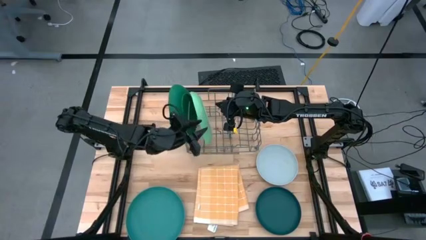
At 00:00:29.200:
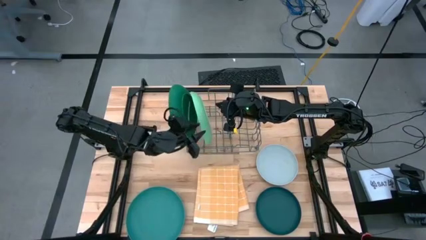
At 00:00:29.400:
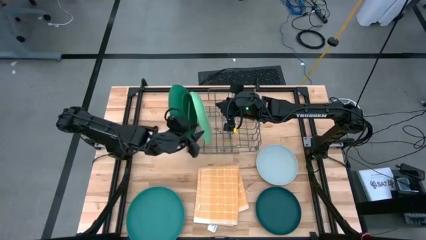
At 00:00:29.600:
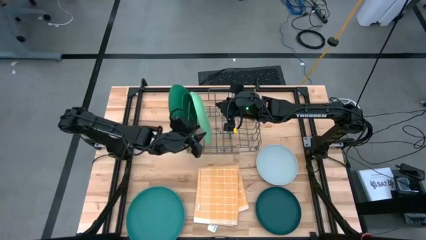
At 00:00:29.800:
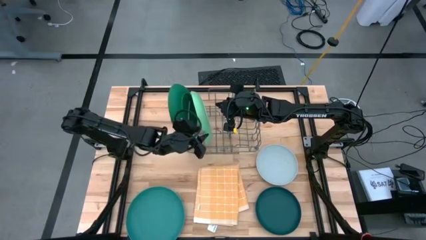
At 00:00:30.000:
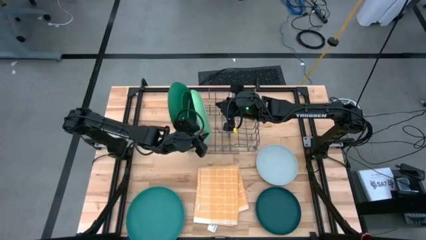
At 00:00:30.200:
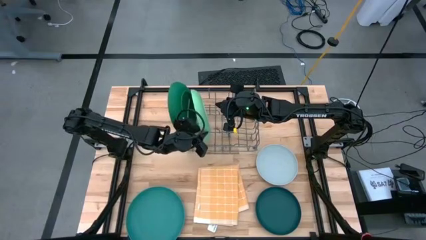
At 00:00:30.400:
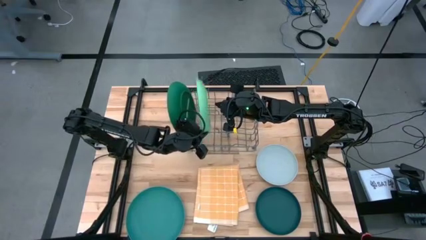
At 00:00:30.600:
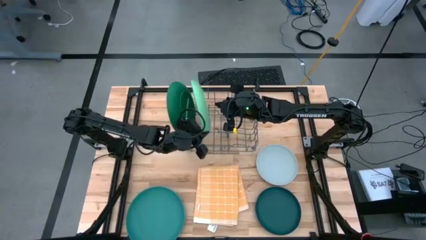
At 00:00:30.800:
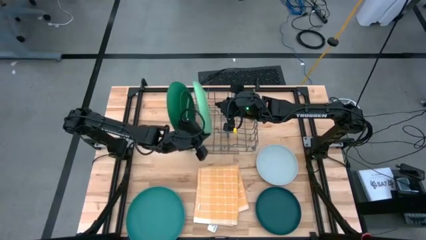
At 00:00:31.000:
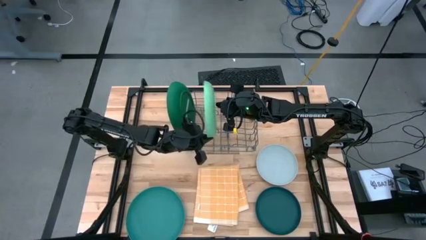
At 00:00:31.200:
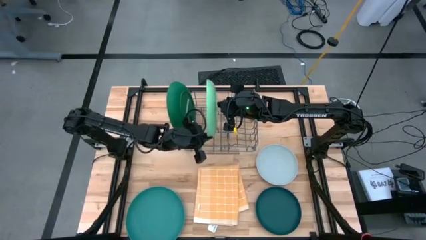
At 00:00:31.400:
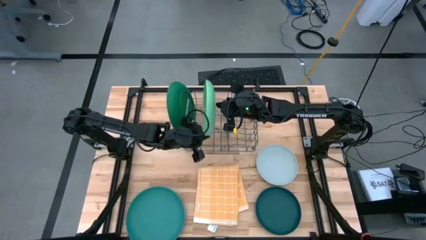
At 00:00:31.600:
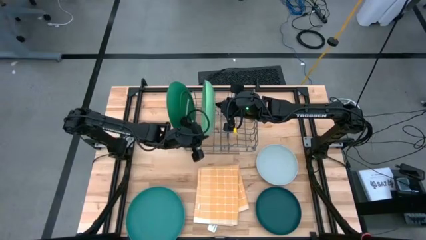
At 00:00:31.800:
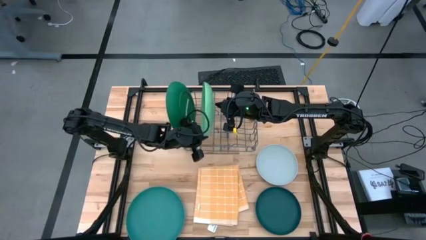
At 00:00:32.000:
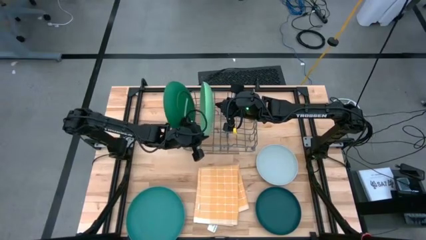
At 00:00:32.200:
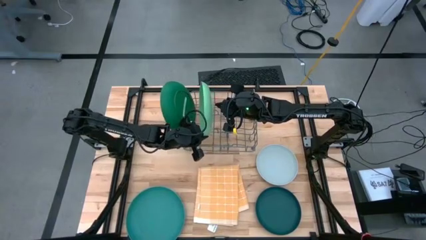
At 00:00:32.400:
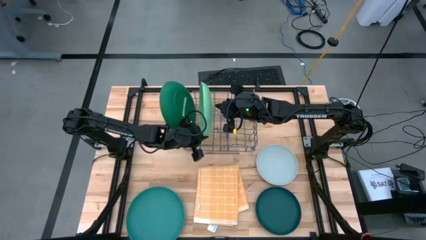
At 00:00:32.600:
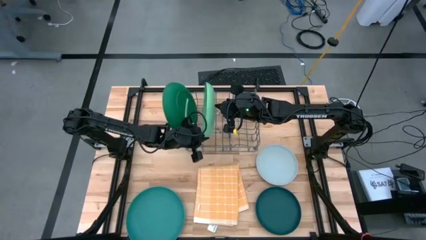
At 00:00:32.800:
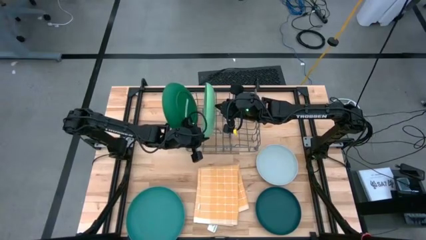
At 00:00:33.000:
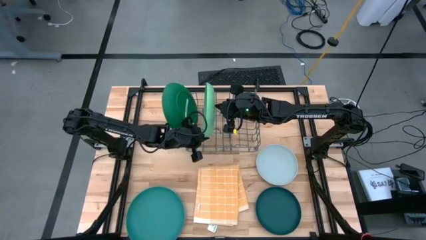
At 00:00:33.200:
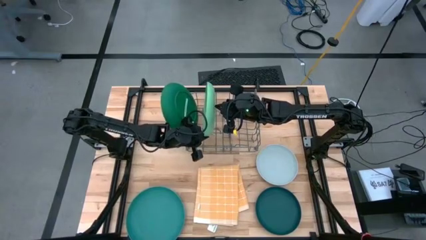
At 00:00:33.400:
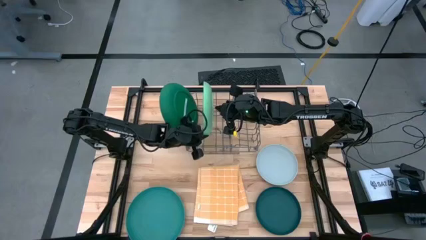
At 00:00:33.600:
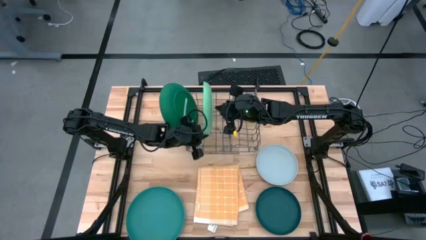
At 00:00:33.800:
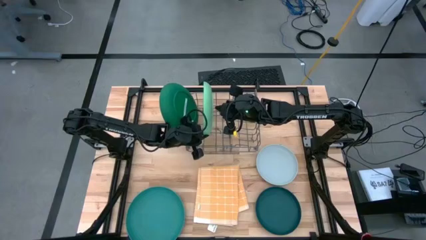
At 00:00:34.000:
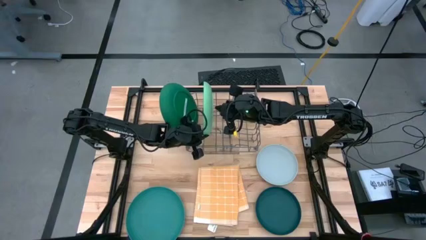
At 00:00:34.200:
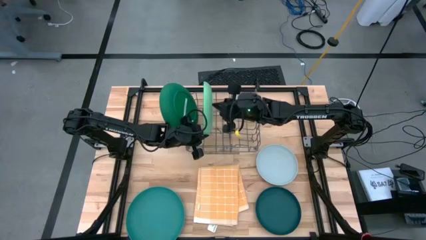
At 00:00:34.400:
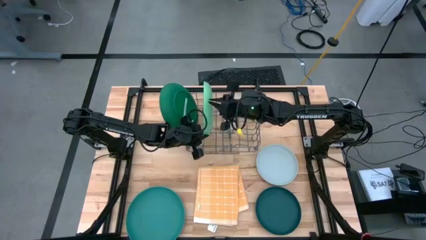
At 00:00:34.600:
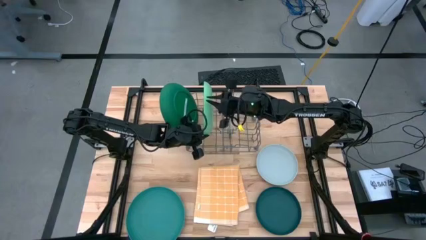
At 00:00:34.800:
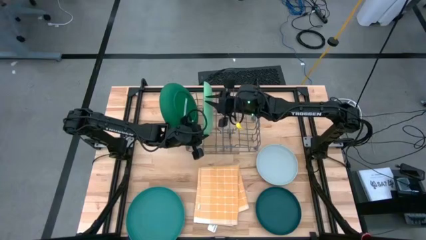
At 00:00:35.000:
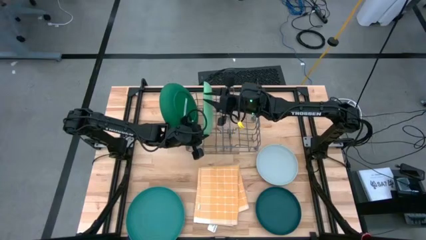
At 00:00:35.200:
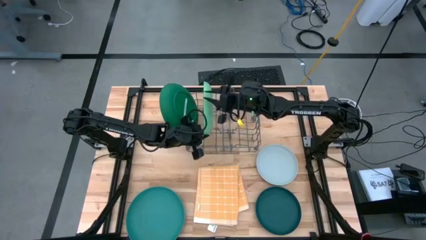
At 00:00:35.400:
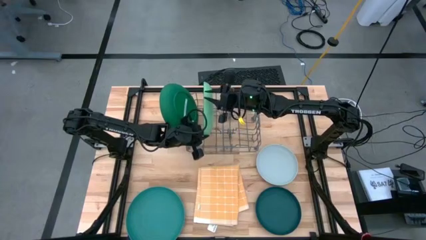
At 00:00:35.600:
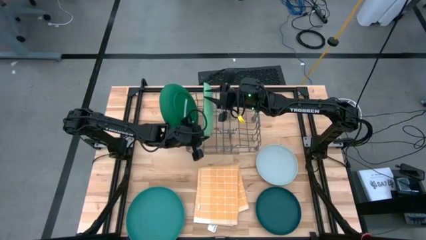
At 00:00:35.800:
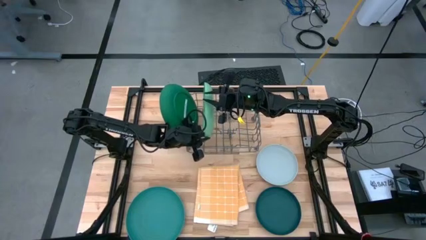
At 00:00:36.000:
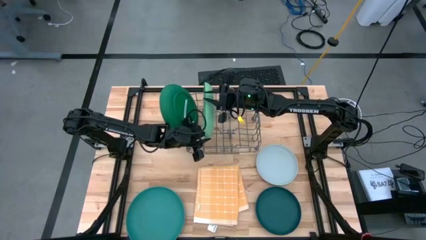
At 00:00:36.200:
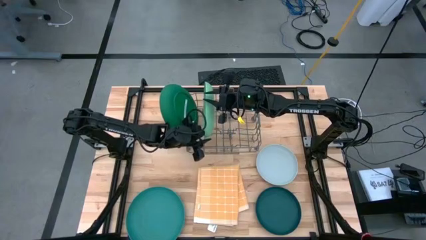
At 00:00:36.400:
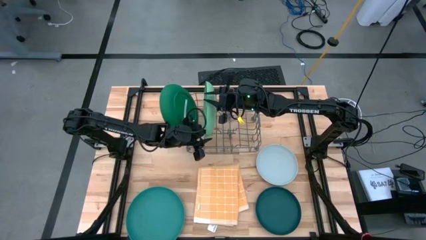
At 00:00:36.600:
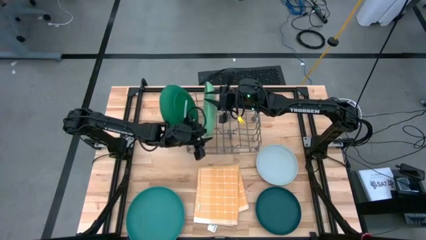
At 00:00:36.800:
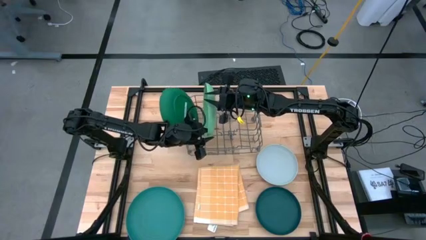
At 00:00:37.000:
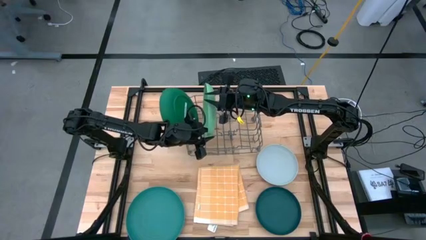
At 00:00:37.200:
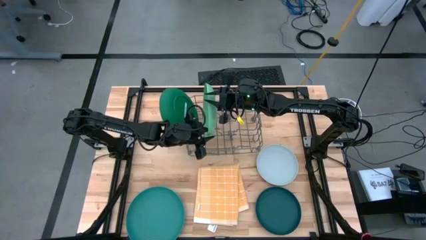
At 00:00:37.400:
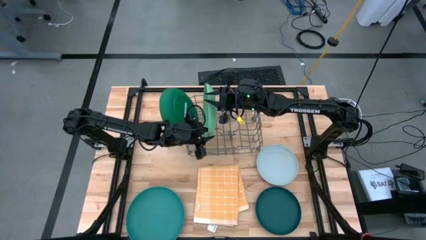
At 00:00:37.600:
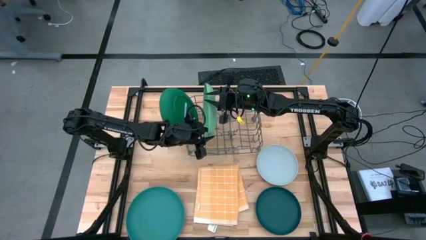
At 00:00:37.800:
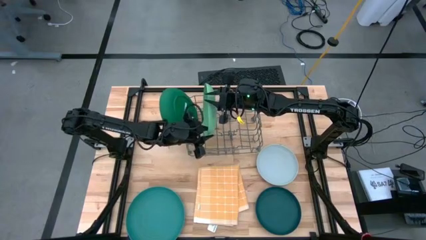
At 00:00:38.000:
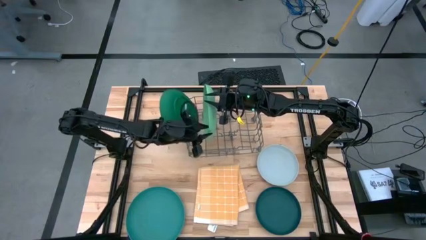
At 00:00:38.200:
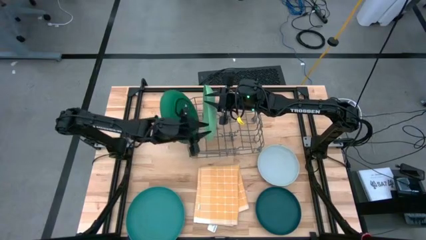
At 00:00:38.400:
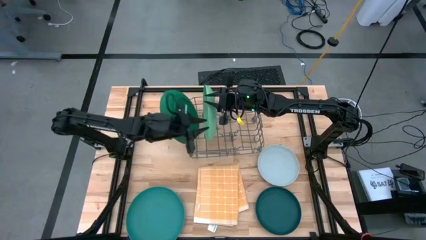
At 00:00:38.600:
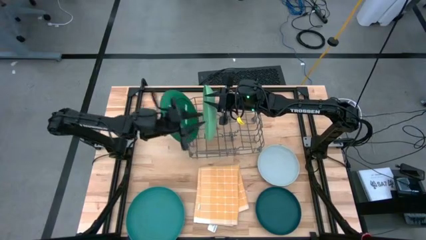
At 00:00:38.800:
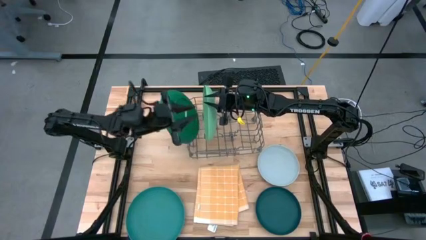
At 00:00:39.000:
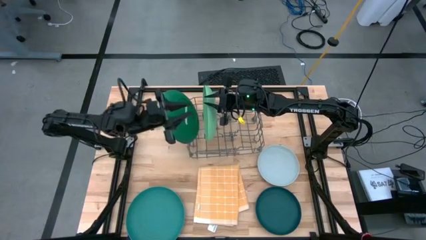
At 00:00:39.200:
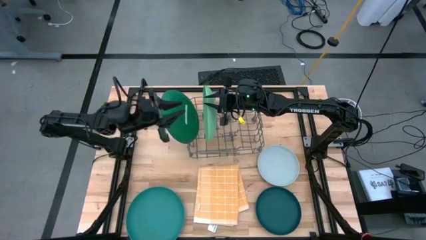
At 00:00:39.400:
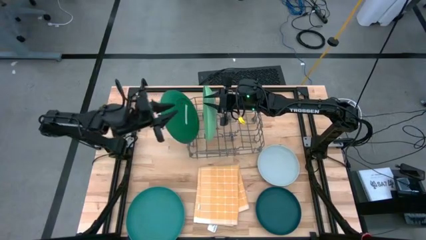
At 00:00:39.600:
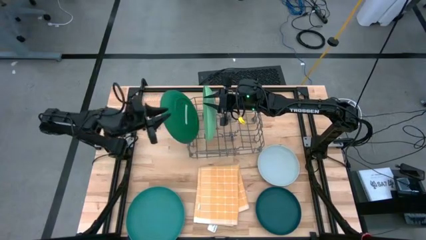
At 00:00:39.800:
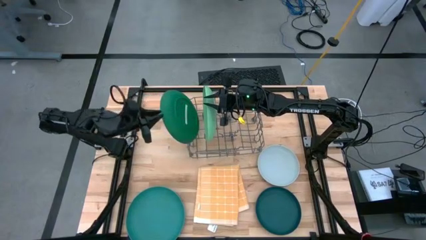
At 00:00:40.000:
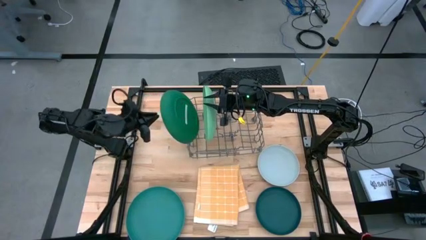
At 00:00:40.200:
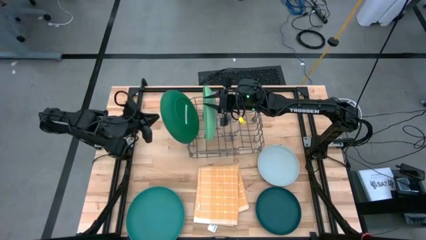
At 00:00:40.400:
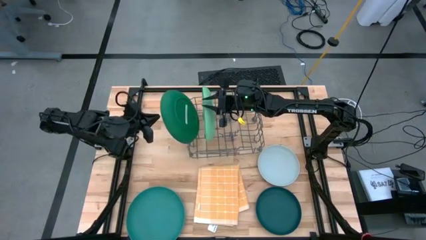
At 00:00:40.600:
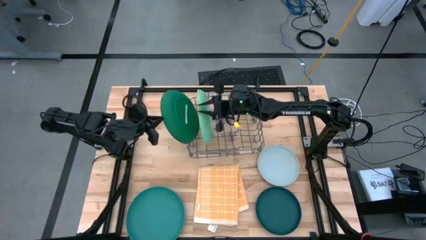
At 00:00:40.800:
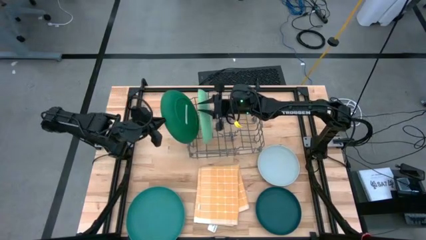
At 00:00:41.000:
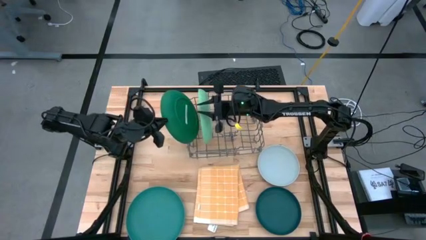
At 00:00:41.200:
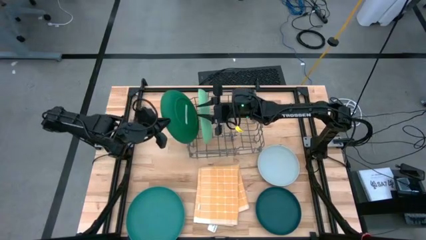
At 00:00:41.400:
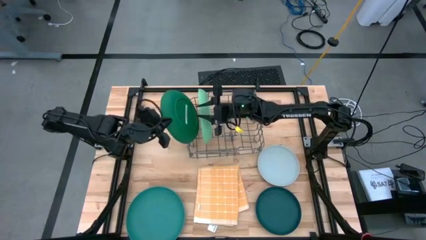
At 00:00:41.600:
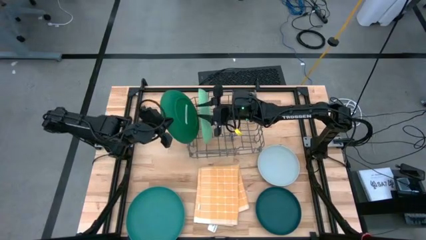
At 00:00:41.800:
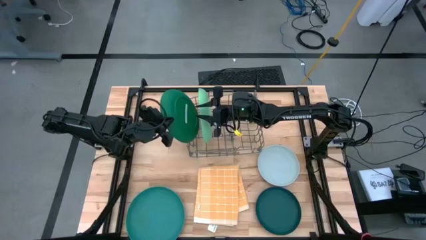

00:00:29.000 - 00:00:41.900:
Task: Sort dishes
Put the light green plate in the dish rack
